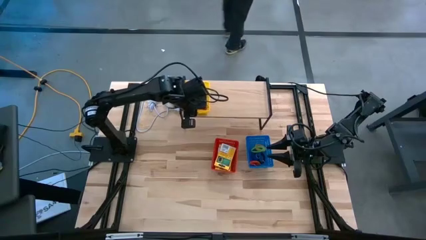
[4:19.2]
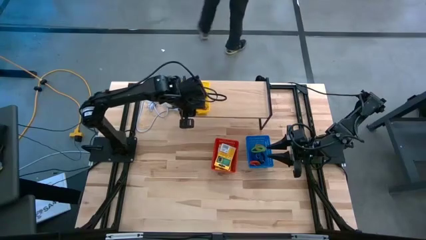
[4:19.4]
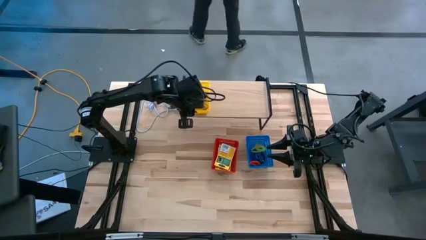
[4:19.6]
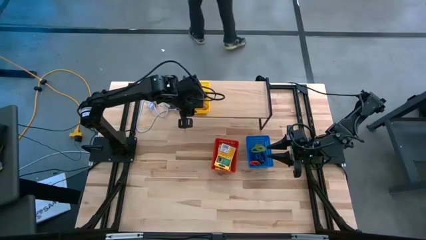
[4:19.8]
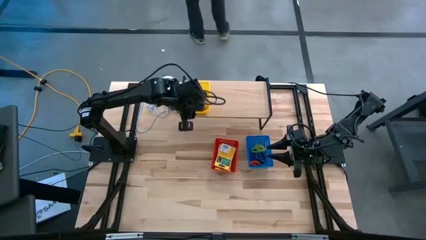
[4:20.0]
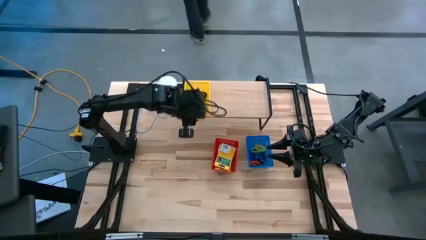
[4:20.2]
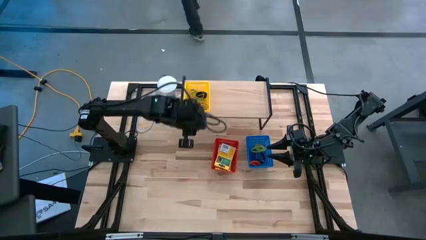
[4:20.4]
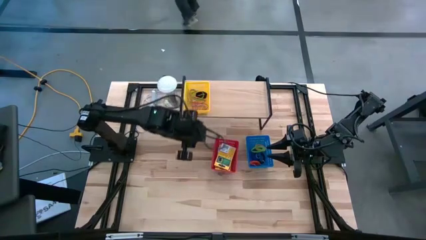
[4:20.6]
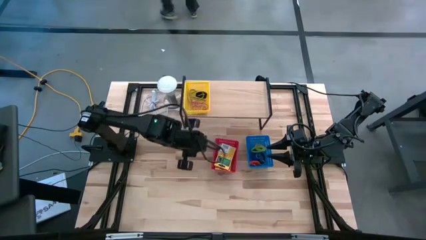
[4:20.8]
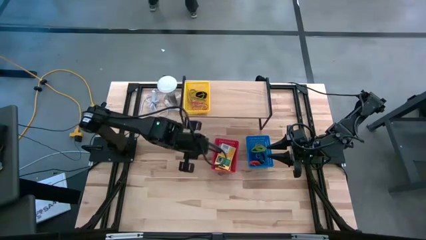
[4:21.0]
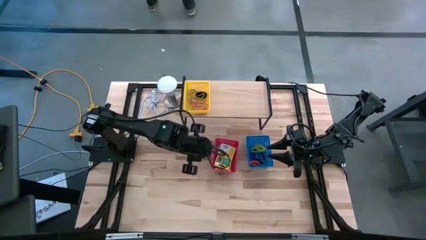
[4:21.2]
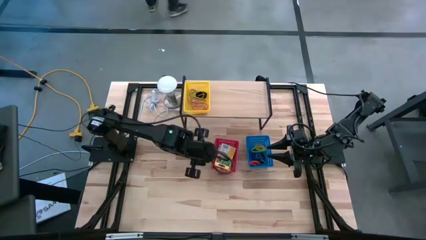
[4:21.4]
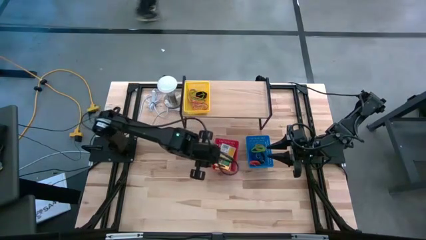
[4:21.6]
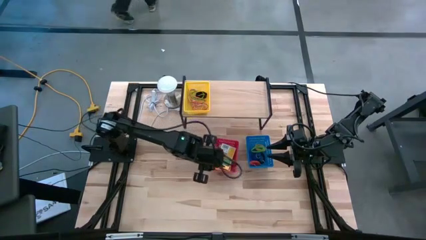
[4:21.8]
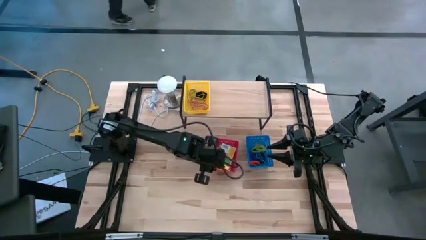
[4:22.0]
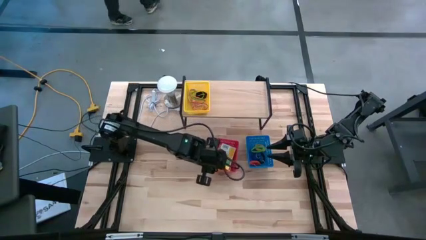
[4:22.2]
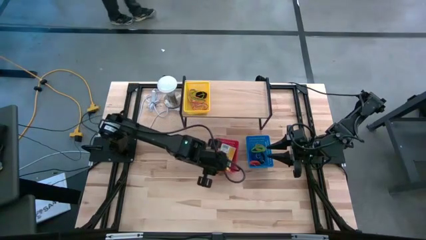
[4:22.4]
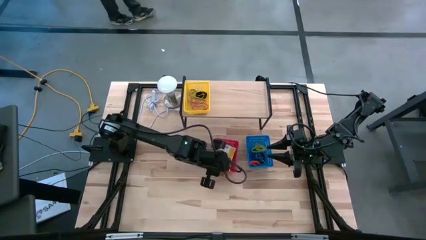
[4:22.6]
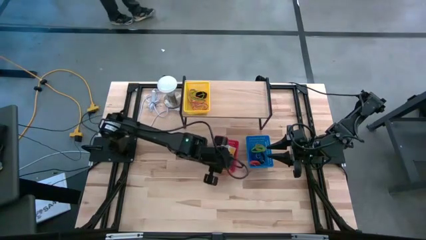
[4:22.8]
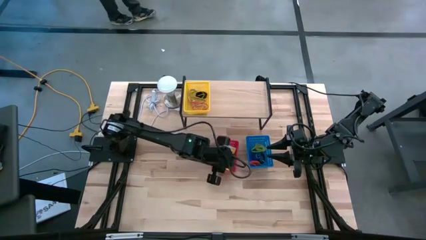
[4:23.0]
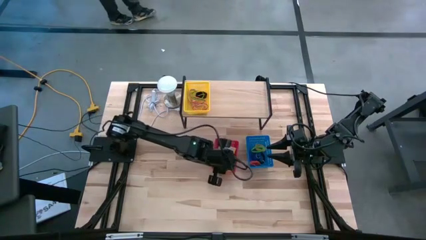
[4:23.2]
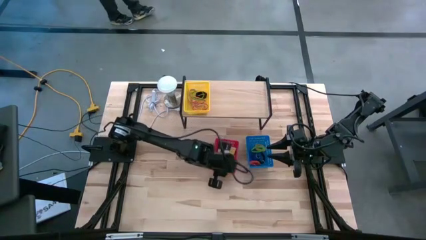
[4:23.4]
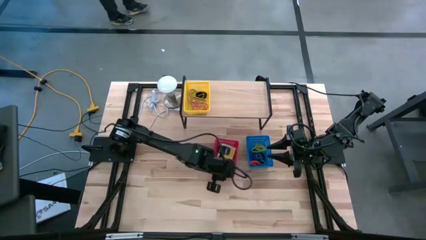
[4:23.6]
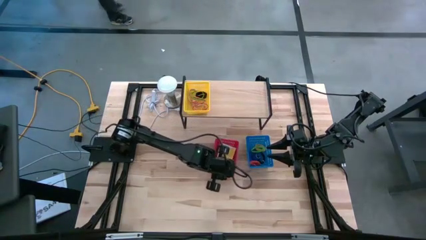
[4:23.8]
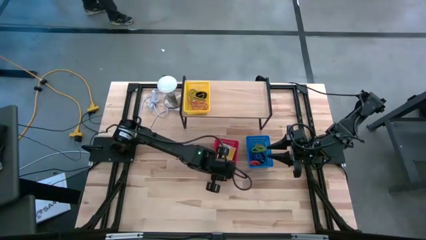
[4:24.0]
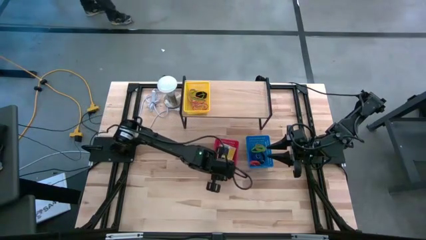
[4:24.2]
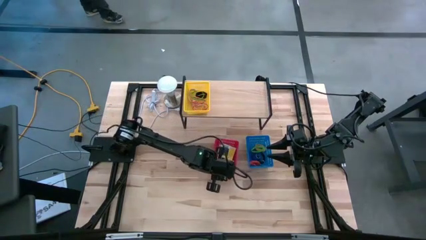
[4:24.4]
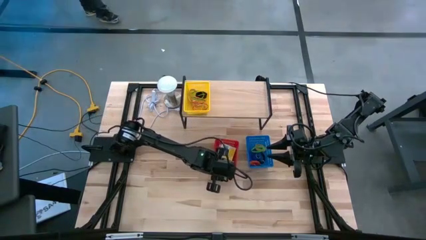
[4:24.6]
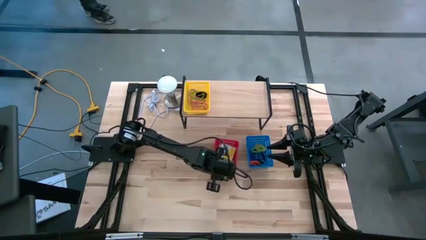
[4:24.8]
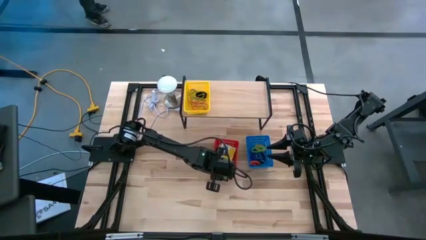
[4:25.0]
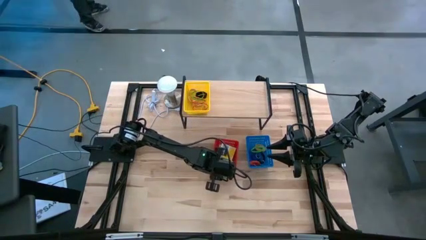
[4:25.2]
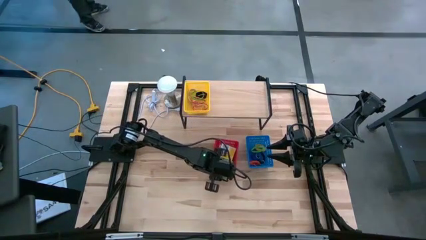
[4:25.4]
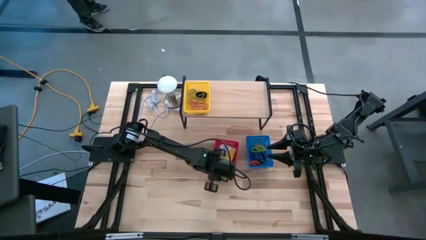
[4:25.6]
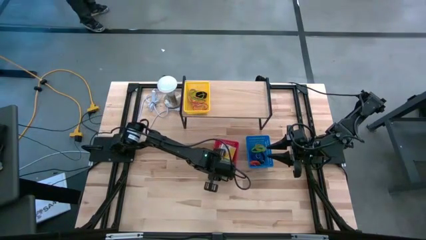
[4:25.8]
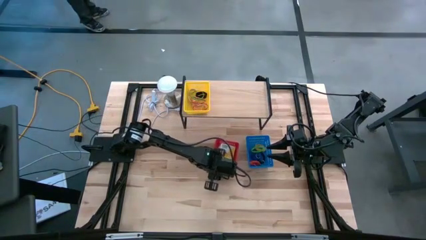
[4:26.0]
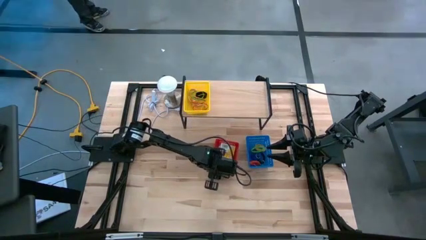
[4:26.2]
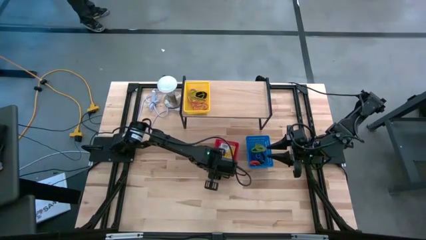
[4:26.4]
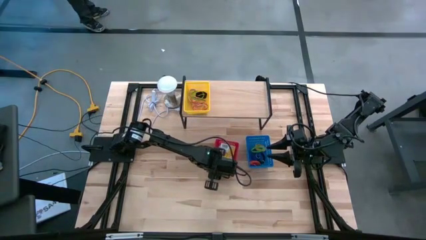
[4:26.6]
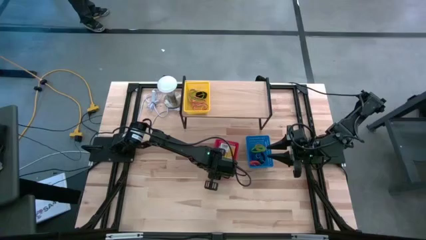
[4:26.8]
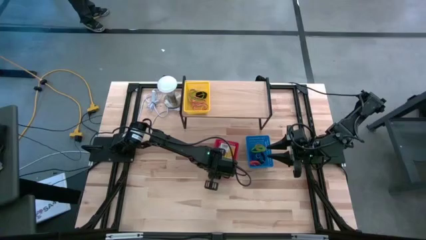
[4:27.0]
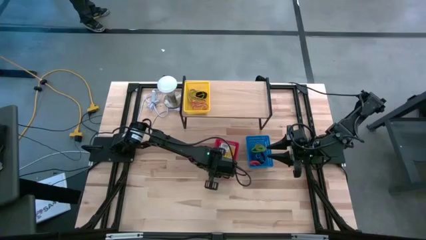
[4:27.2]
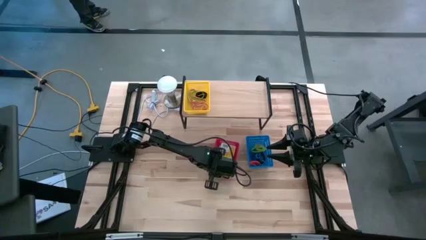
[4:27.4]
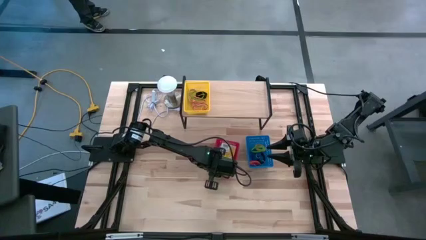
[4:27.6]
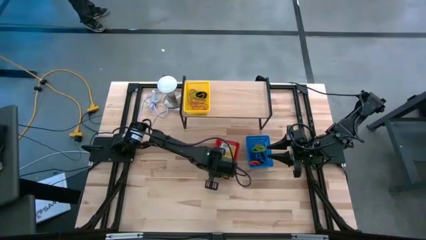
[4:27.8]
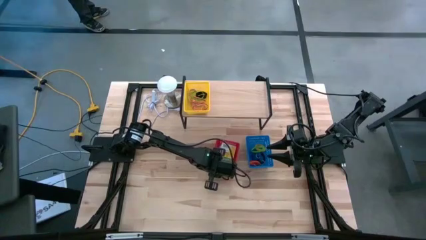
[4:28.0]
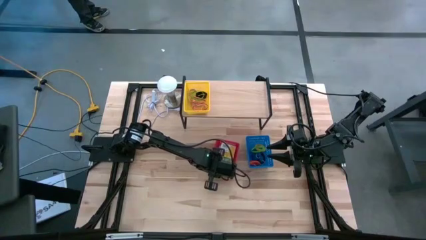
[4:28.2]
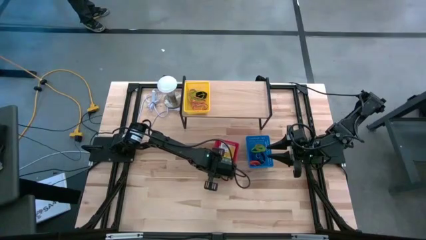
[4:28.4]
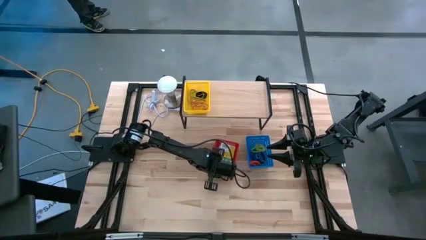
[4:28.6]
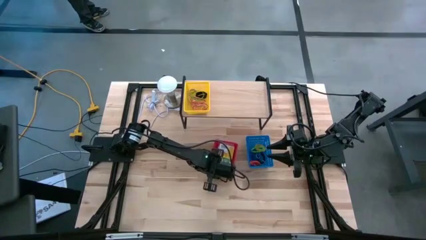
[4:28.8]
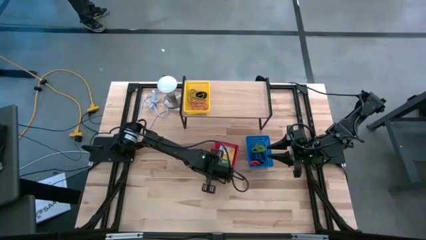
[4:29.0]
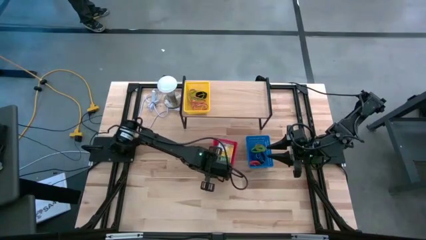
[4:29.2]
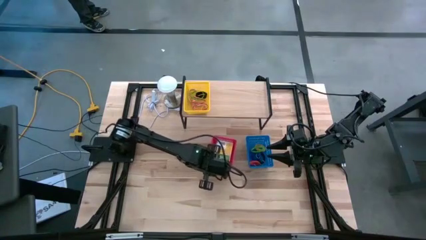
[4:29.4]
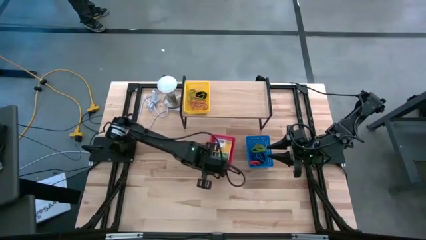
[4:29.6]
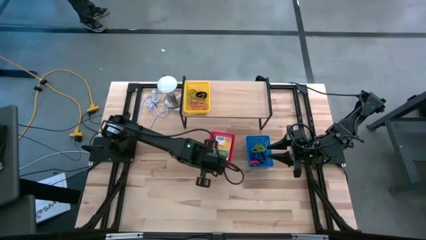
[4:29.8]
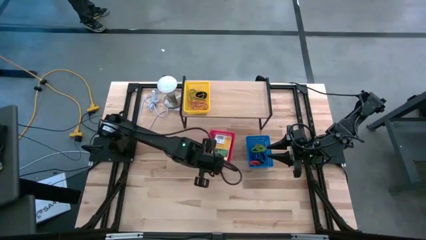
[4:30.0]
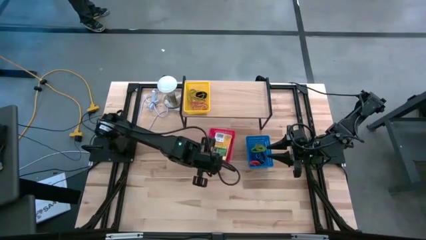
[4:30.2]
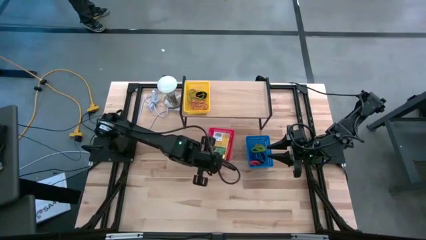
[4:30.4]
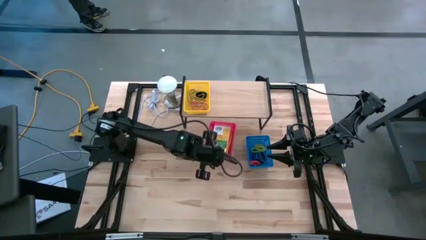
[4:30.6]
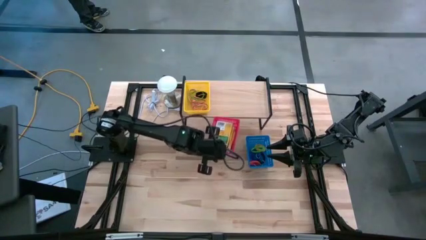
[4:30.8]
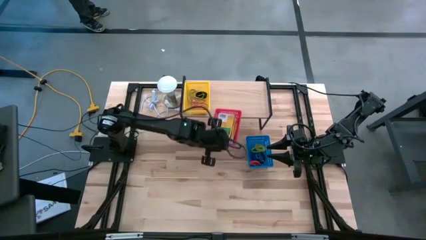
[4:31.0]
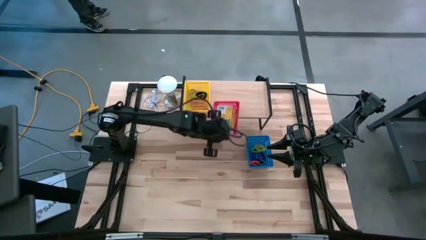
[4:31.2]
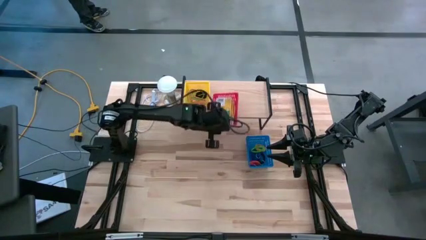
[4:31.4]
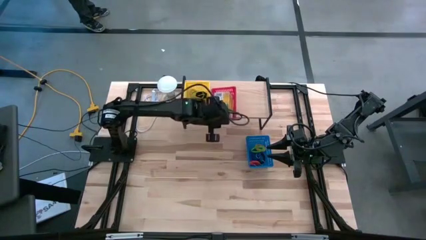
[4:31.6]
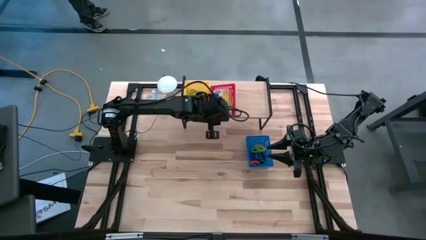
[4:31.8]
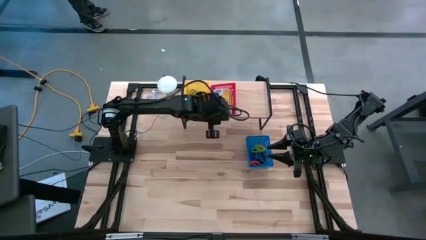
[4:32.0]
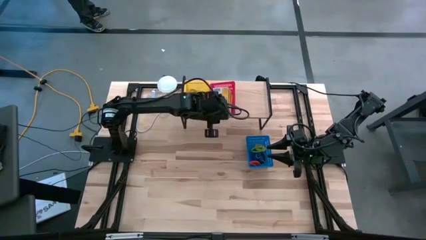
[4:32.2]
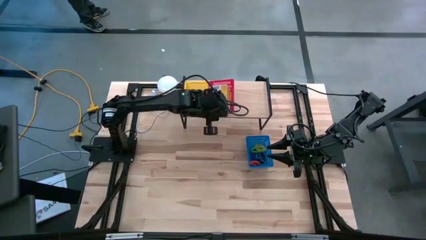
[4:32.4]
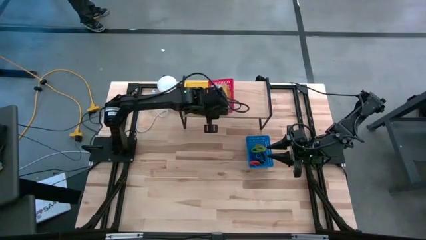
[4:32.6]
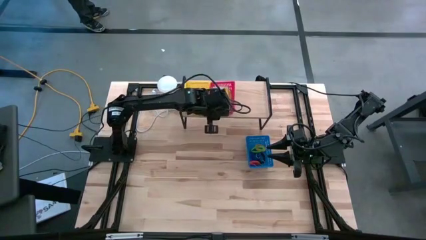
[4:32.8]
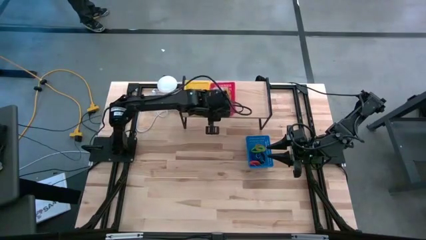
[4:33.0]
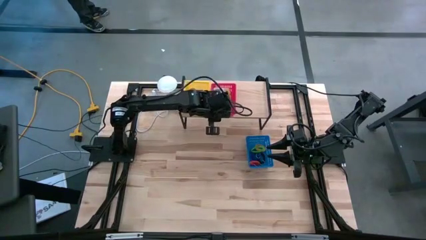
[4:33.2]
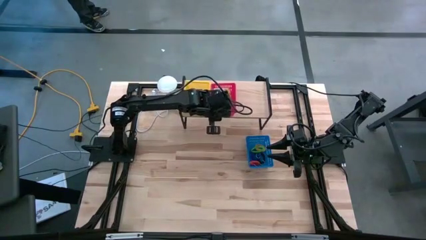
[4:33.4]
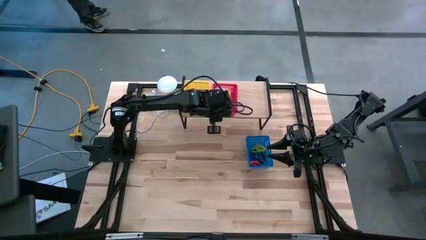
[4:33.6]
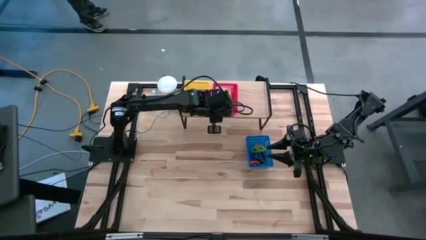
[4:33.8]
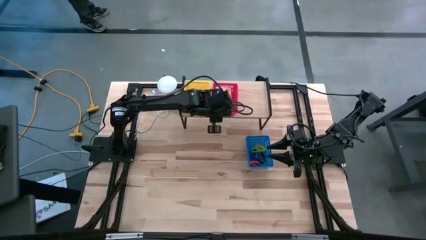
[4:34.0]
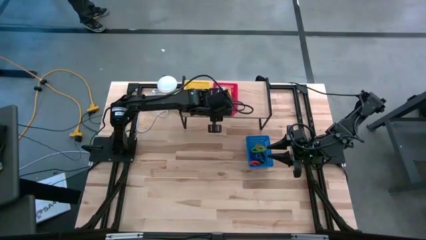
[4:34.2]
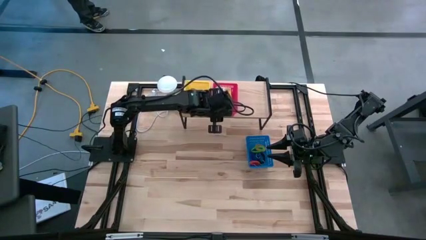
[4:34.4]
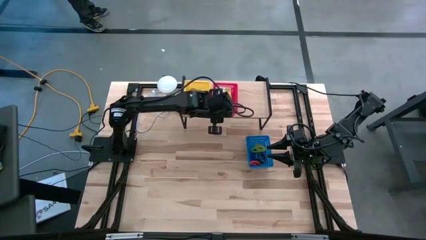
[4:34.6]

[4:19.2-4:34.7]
Task: Pick & Place Office Desk Supplies
Put the red bin with the crayon boxes on the shelf
